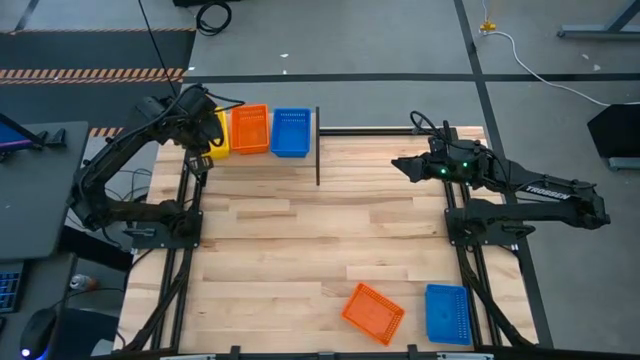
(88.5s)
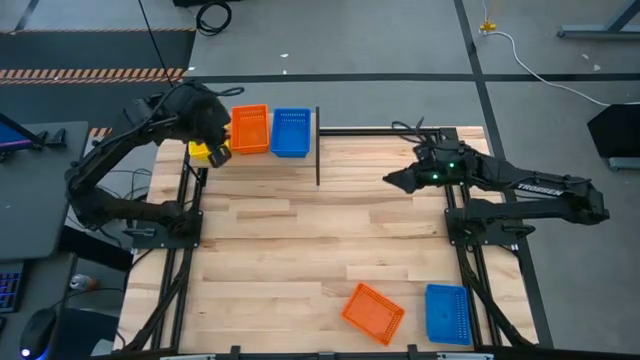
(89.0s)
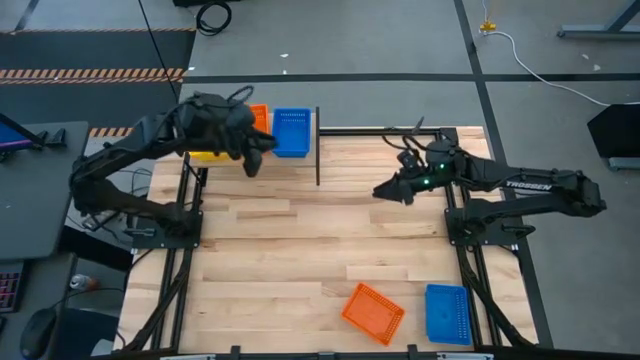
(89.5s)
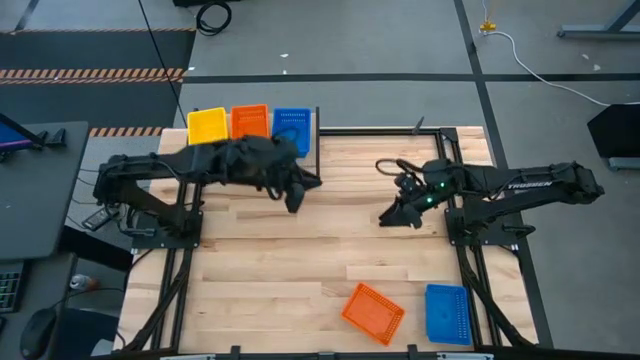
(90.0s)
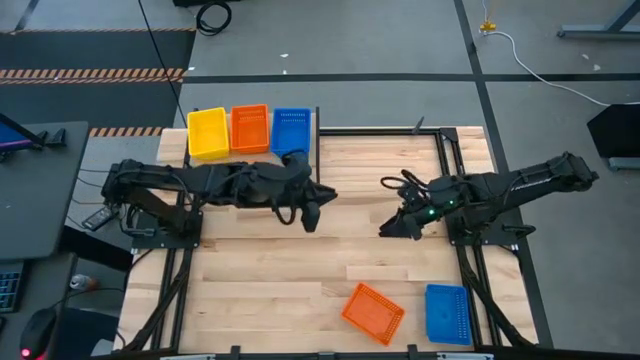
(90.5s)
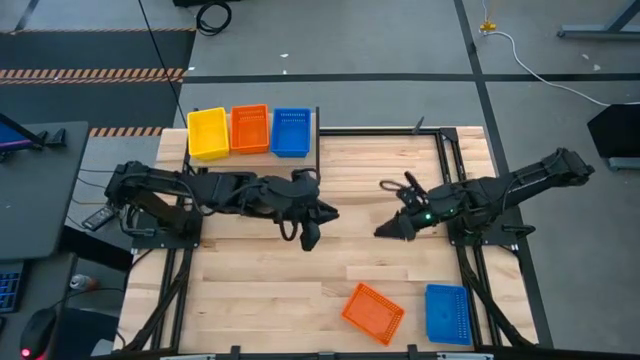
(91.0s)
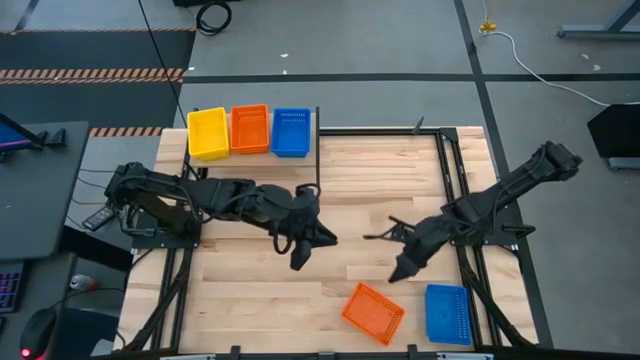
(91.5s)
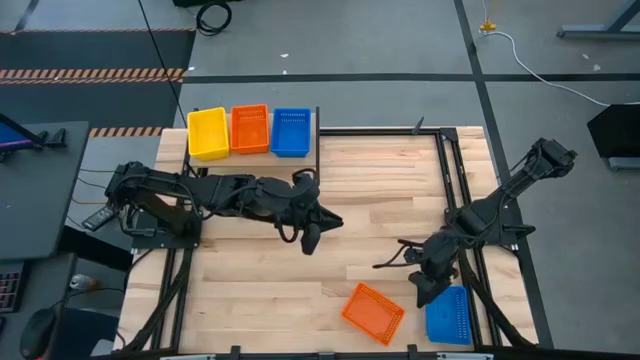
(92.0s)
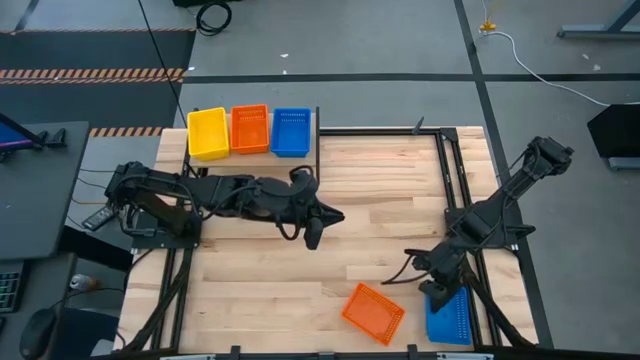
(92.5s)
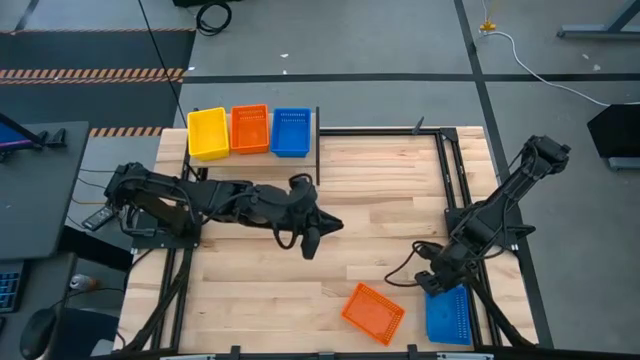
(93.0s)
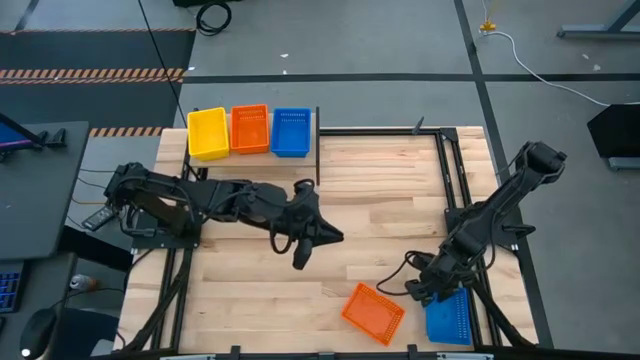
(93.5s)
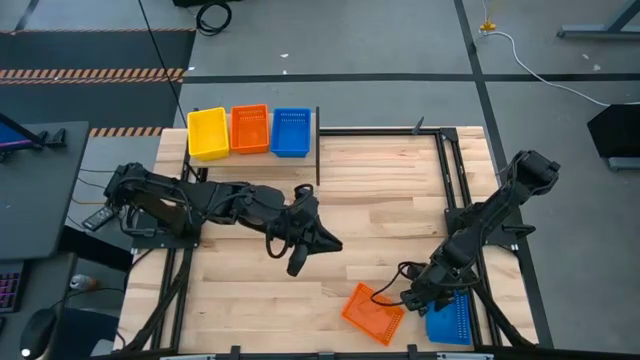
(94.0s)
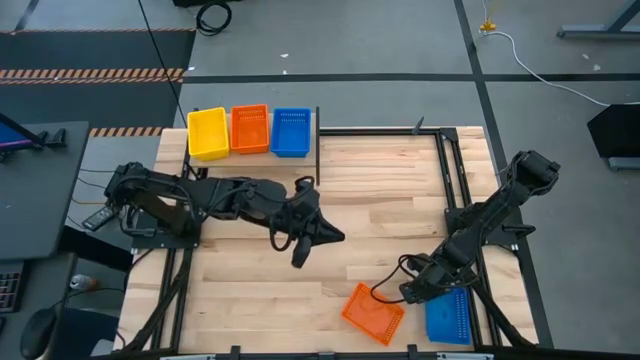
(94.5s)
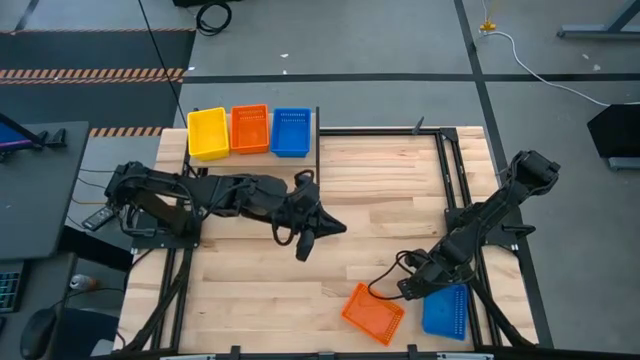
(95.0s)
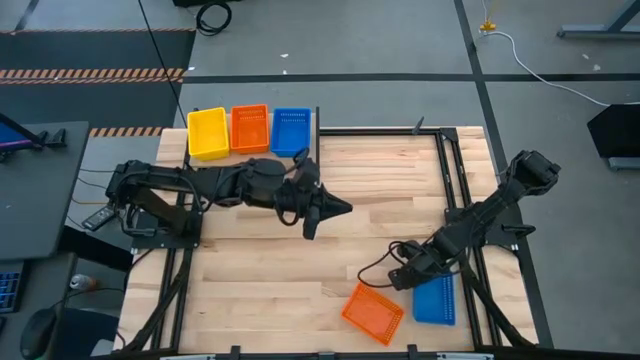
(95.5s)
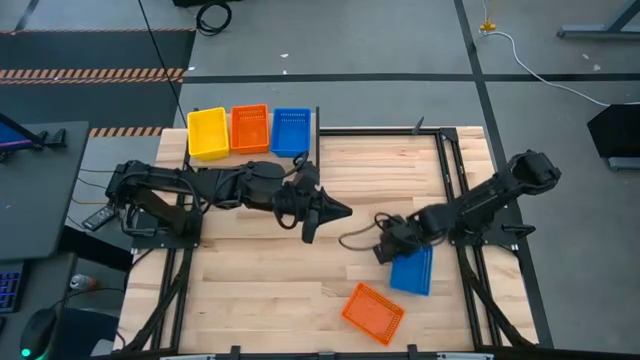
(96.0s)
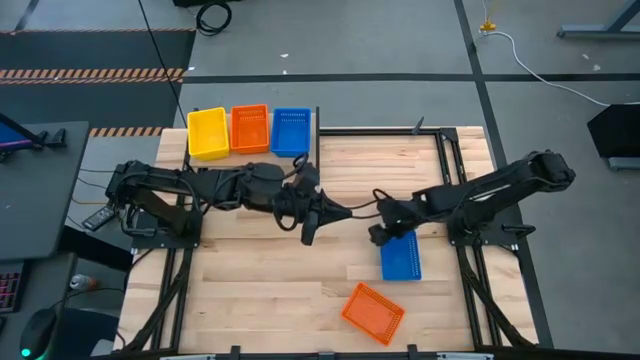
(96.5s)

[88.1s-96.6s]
Task: Stack baskets on shelf by color
Move the blue bin

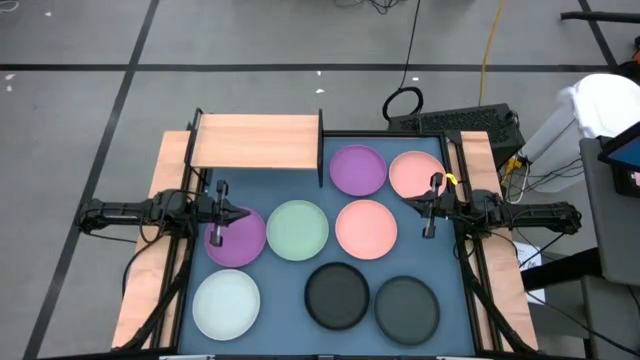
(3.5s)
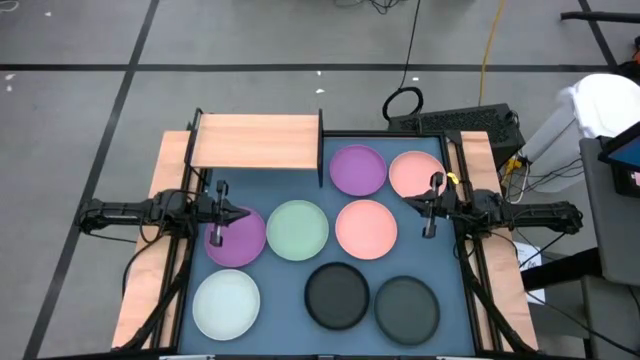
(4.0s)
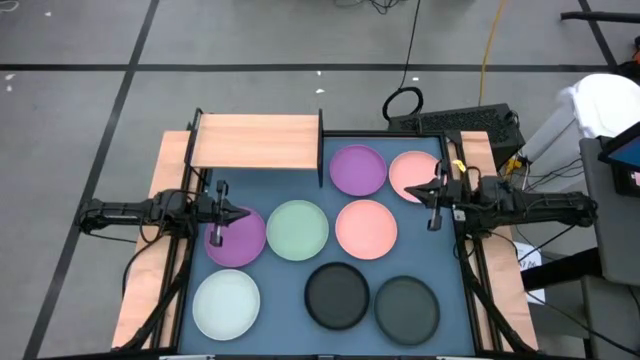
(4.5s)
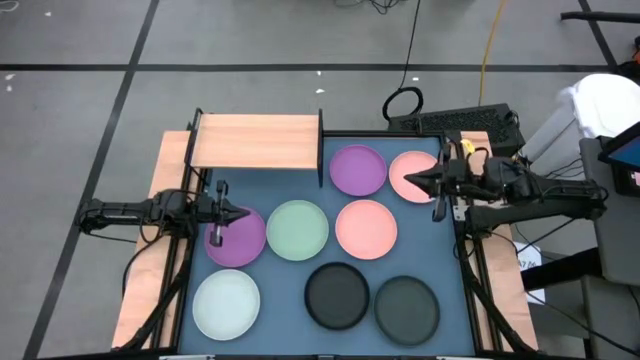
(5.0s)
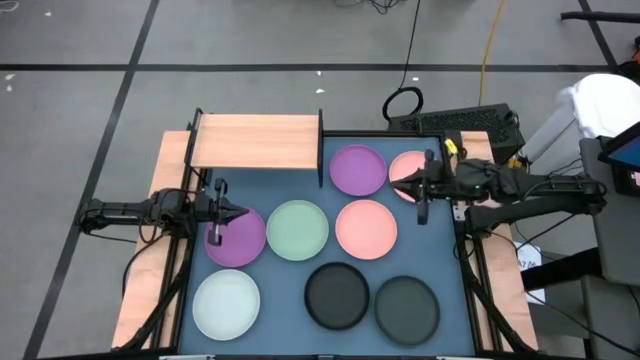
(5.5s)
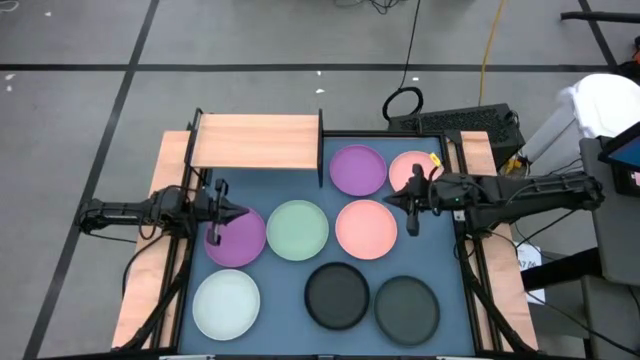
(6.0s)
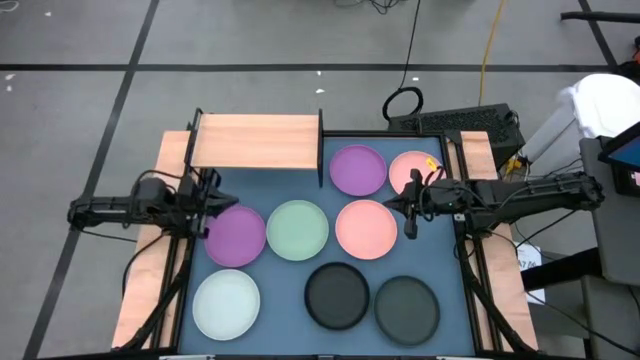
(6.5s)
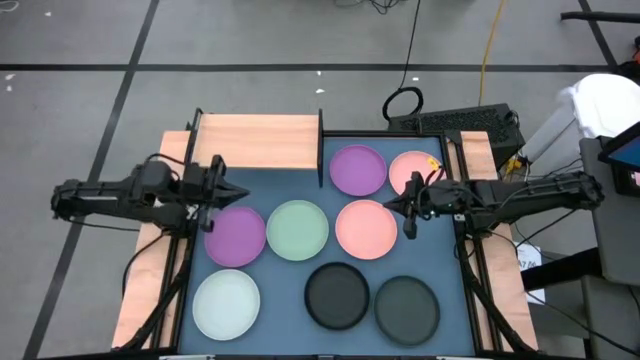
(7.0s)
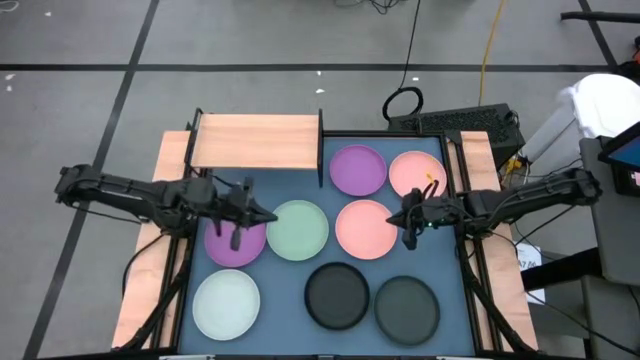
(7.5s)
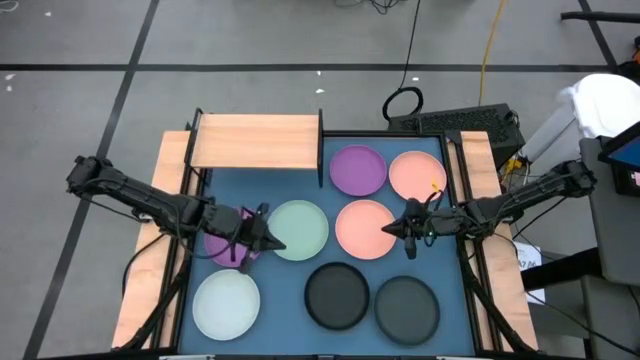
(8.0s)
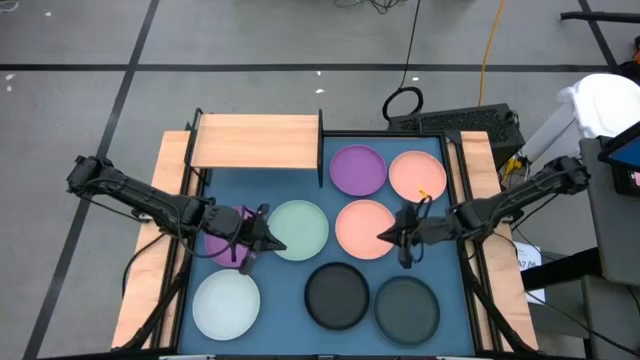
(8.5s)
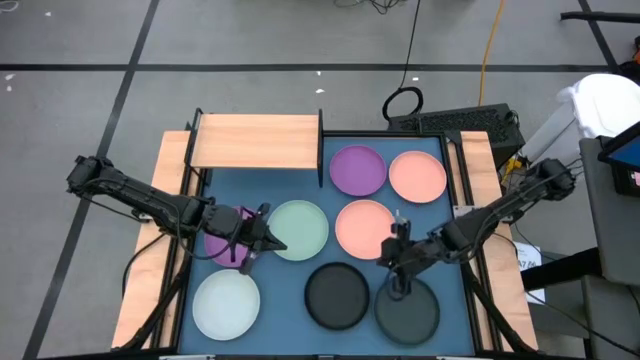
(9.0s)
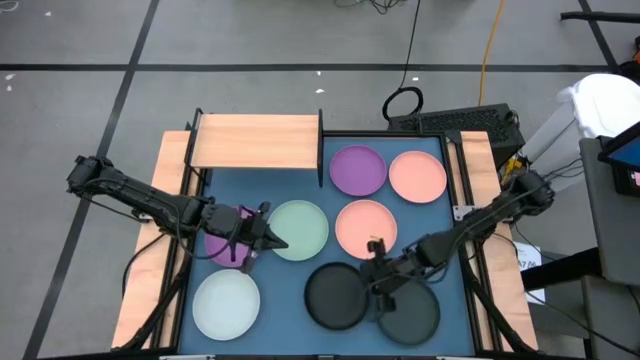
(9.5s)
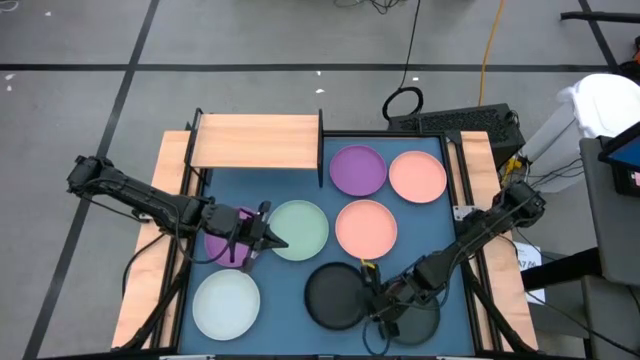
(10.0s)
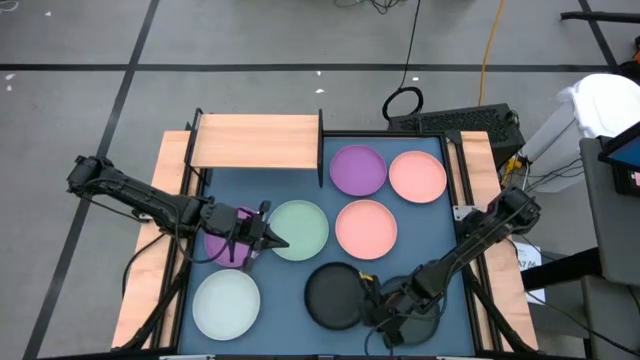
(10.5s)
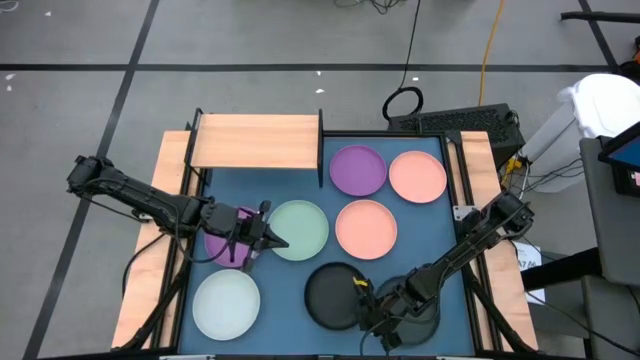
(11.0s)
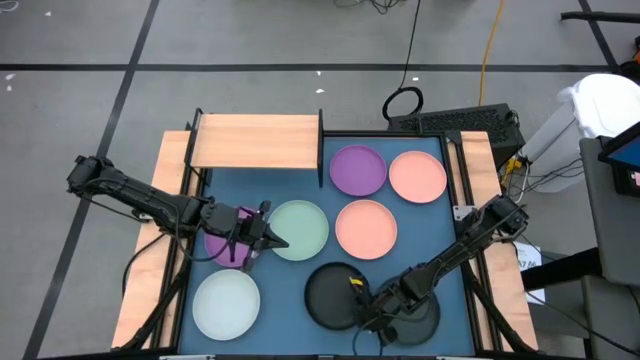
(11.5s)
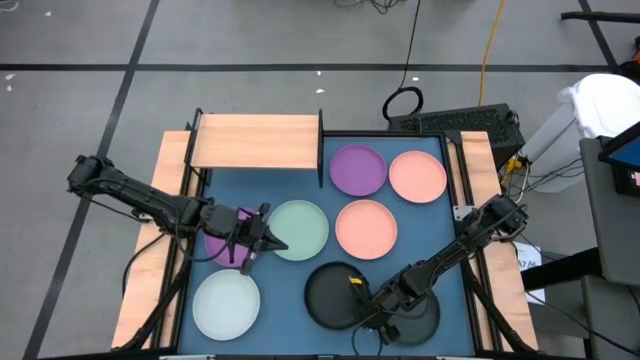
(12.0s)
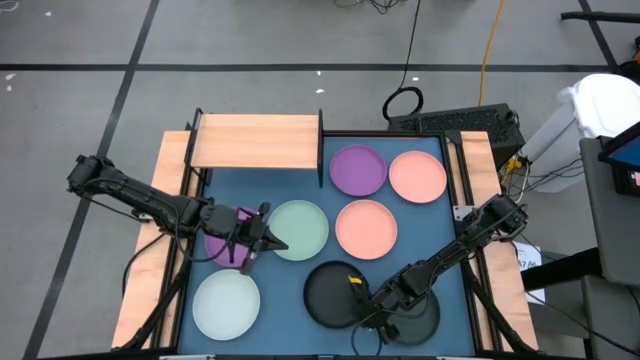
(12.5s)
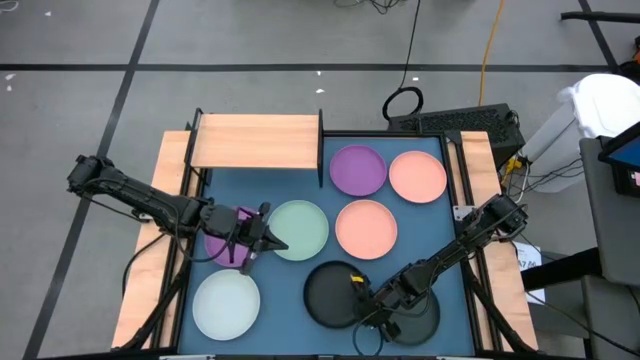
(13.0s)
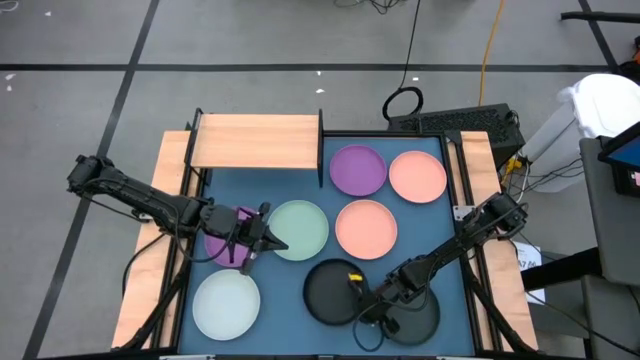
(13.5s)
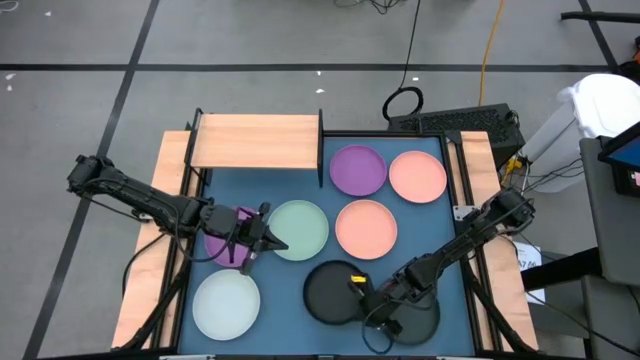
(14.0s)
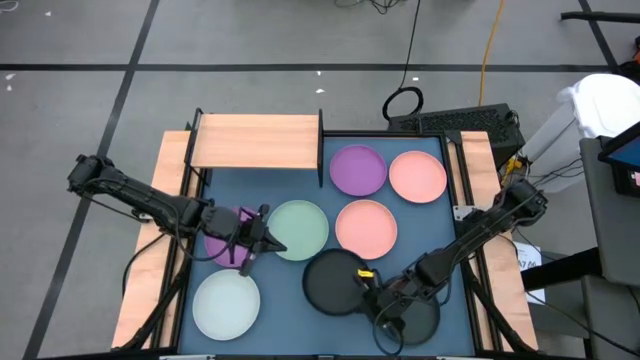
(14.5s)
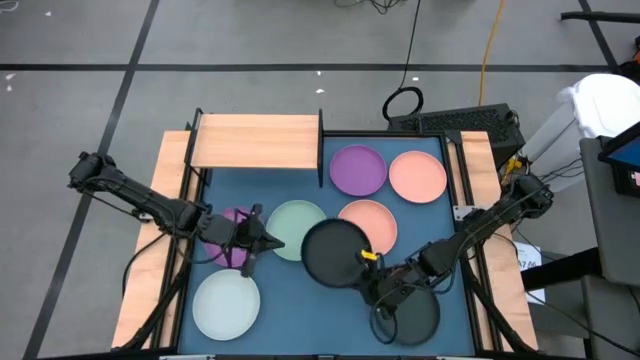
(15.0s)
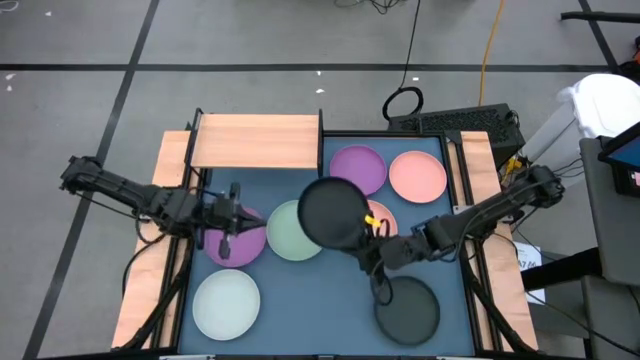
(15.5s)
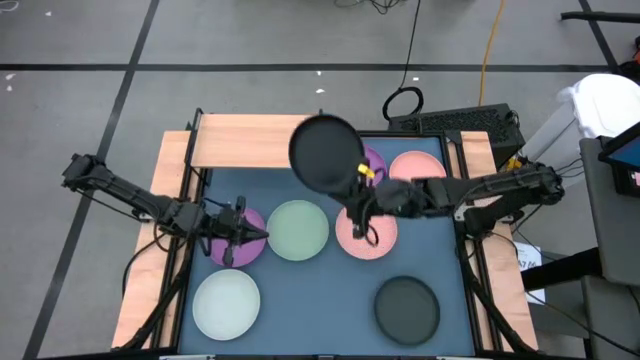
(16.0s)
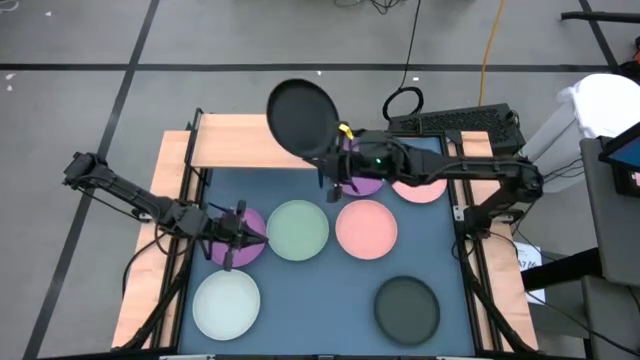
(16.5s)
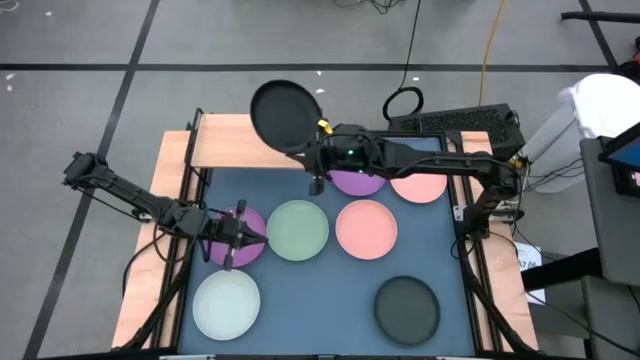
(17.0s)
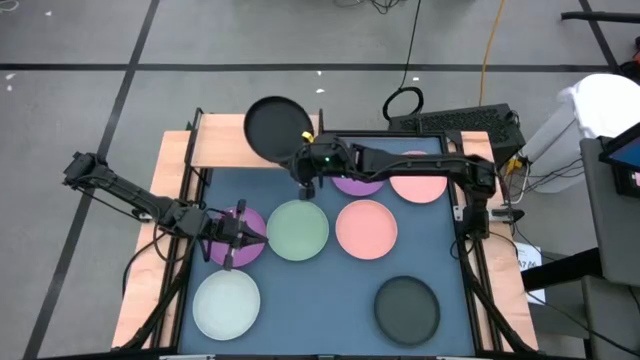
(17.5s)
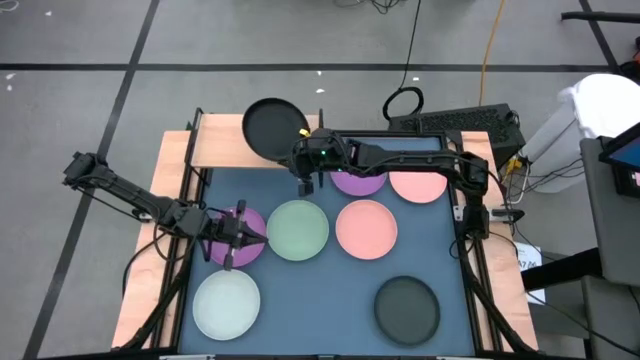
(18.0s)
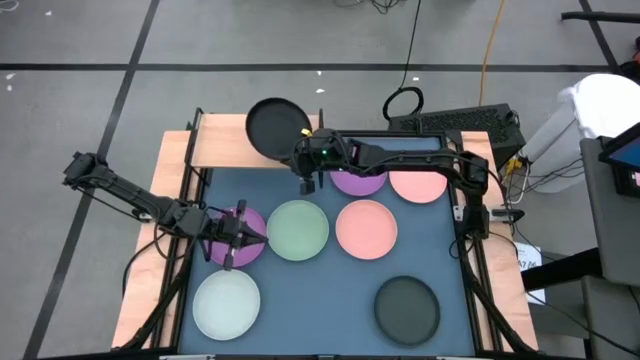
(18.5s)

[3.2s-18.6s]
Task: Place and stack plates onto a shelf
Put the left black plate on the shelf
